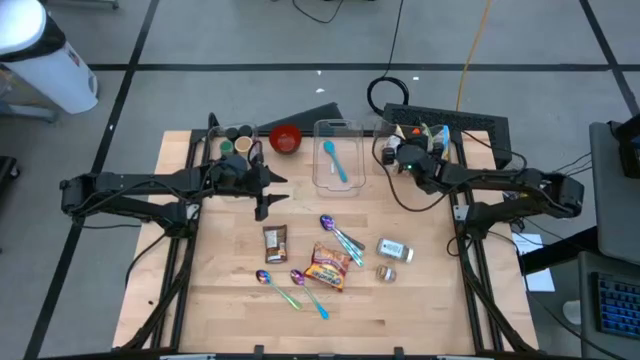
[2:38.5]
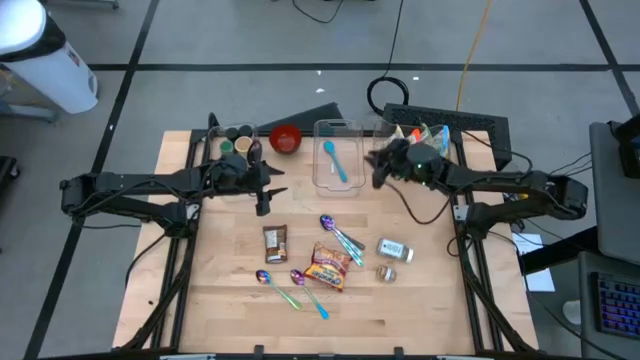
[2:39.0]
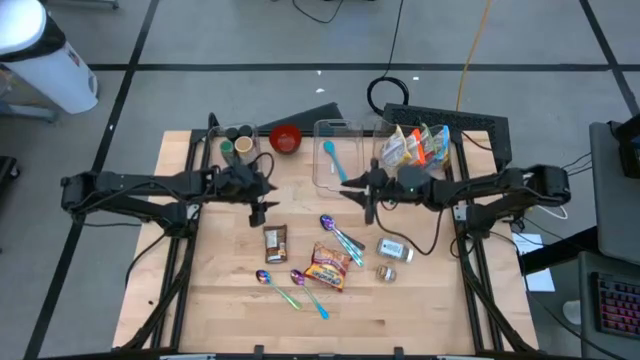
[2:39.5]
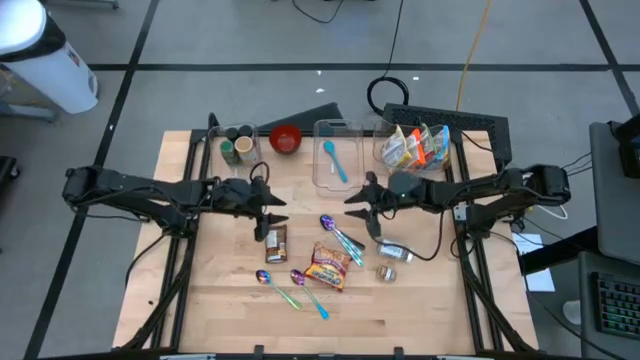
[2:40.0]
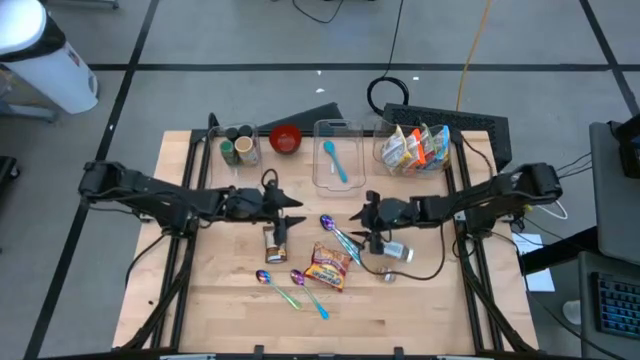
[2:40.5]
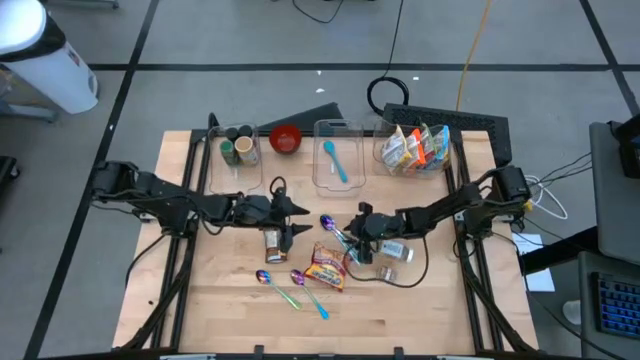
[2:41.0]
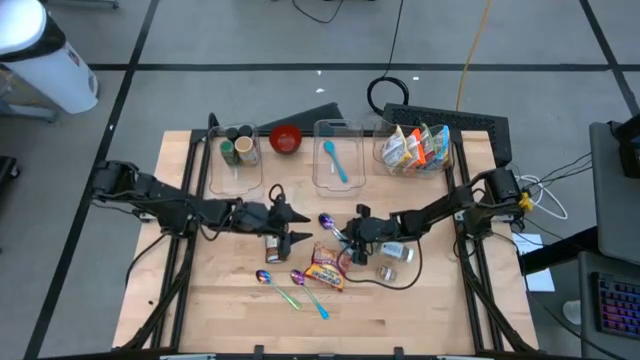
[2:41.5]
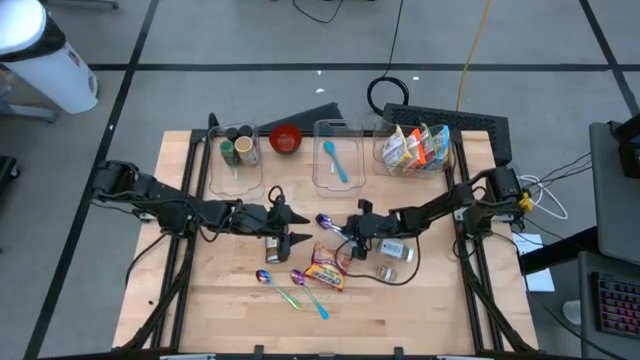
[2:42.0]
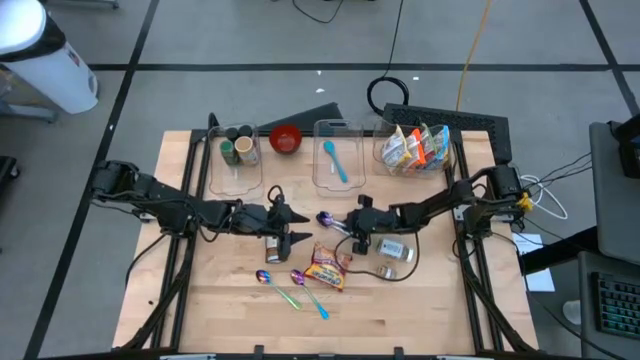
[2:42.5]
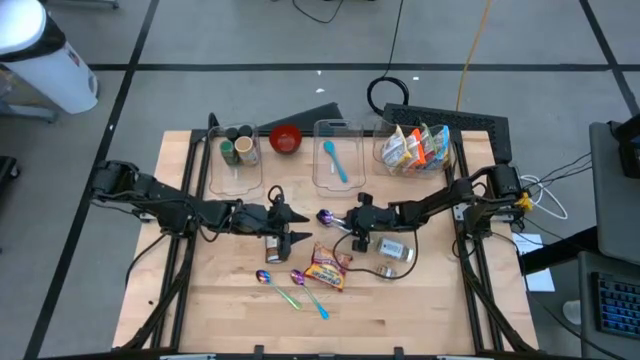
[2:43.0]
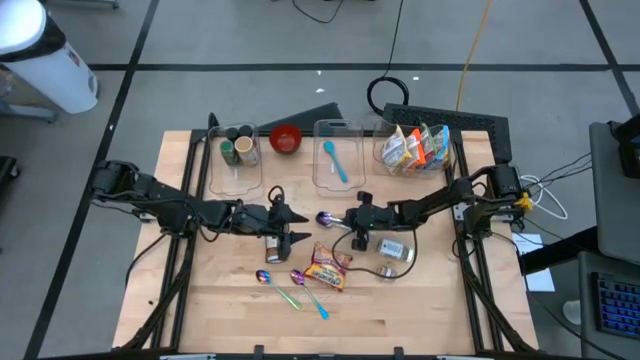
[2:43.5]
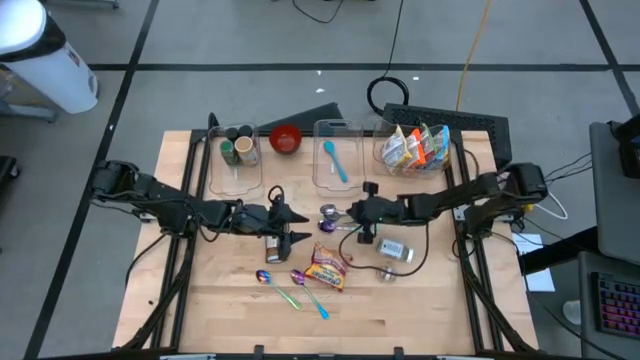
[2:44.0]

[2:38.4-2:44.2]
Task: Pick & Place Food Item
Put the top blue patterned spoon into the middle transparent bin

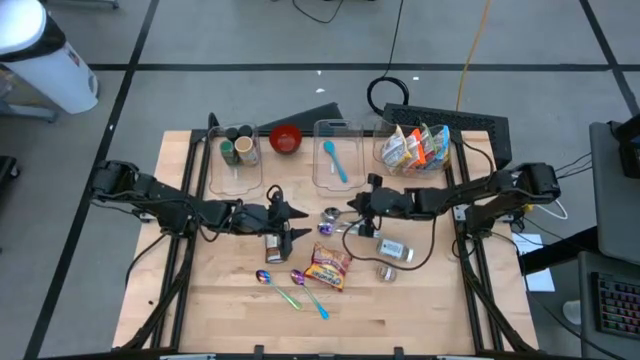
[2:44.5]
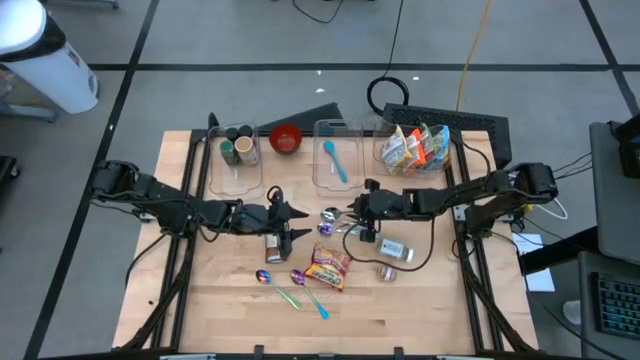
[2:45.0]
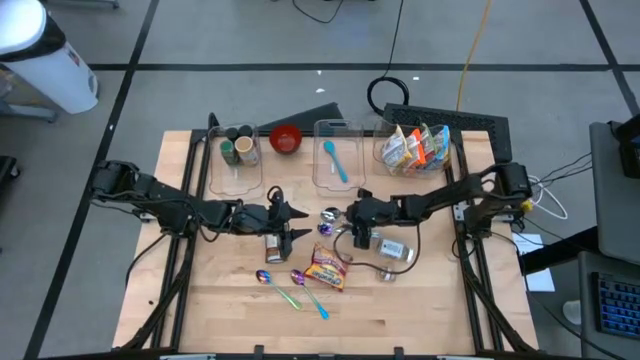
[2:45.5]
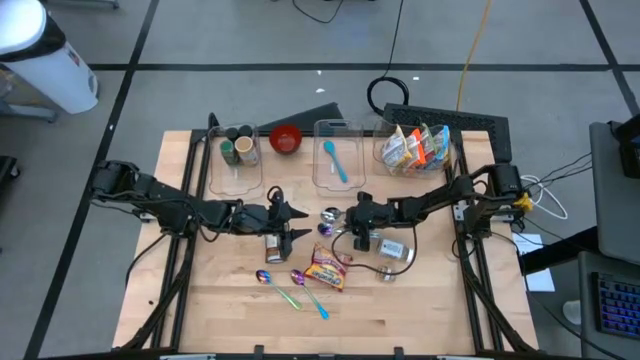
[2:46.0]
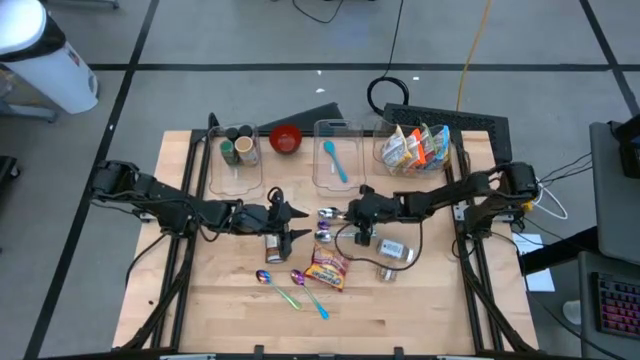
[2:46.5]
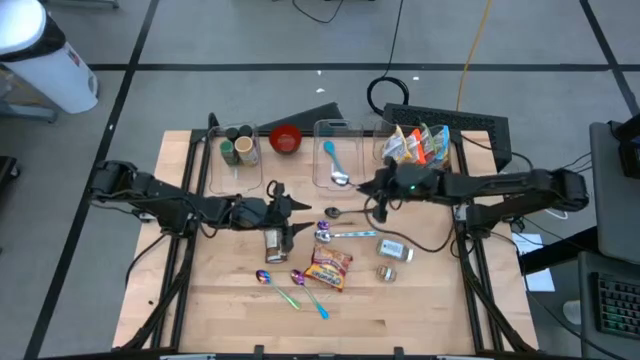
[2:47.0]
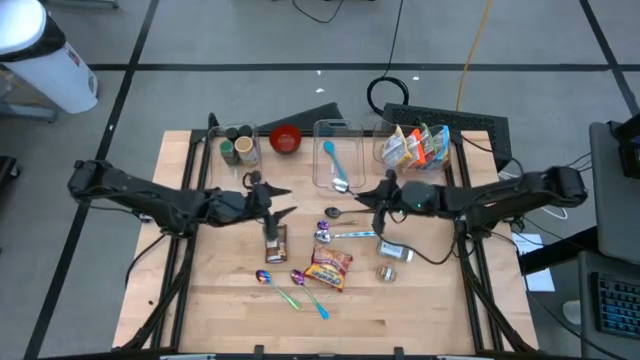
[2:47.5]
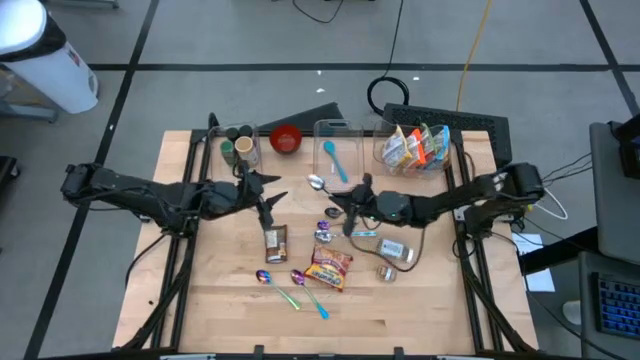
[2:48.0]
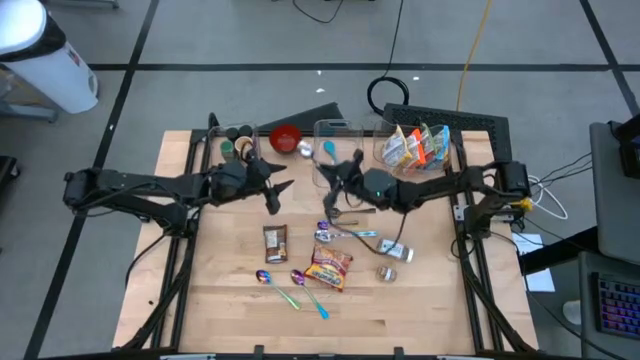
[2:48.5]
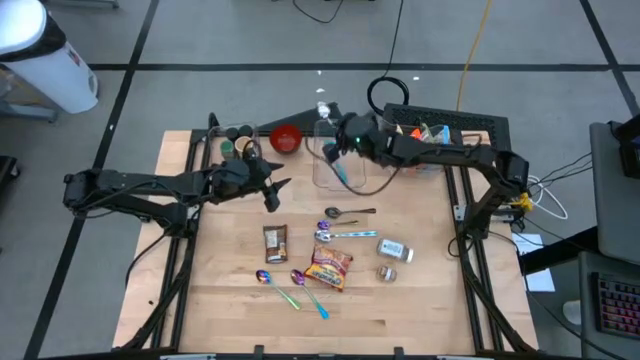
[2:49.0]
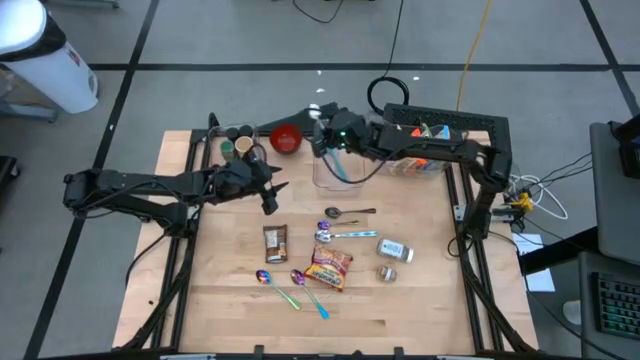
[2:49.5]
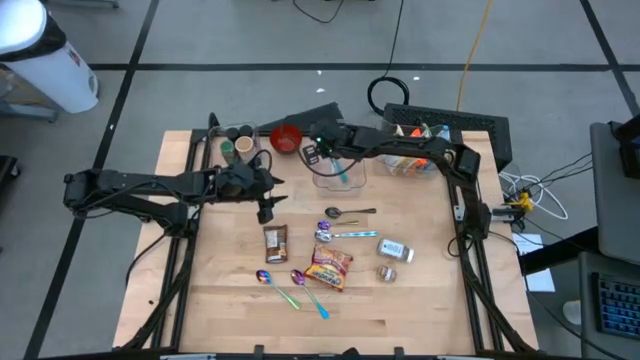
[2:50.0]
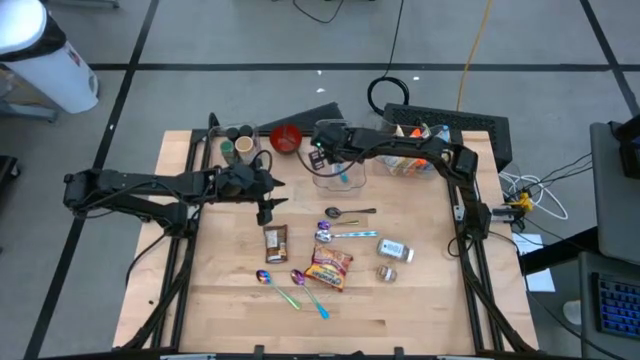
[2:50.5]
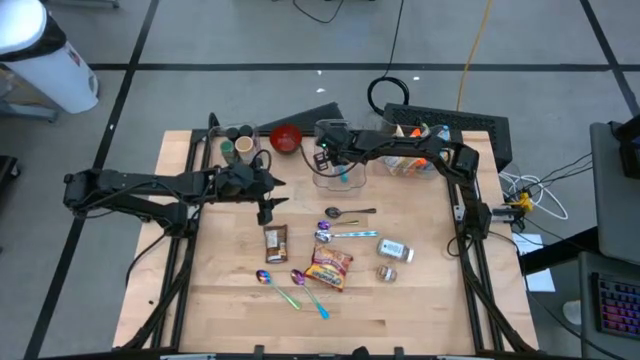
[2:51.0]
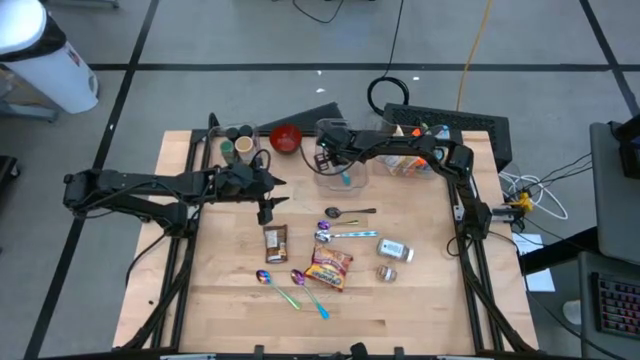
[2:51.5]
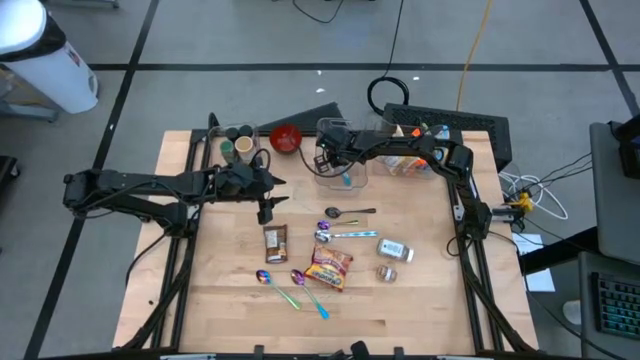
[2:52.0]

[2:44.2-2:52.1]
Put the top blue patterned spoon into the middle transparent bin

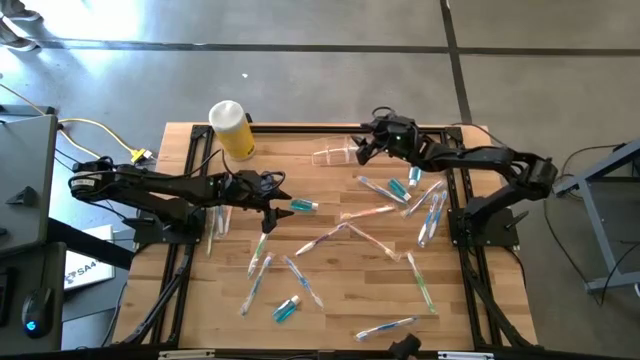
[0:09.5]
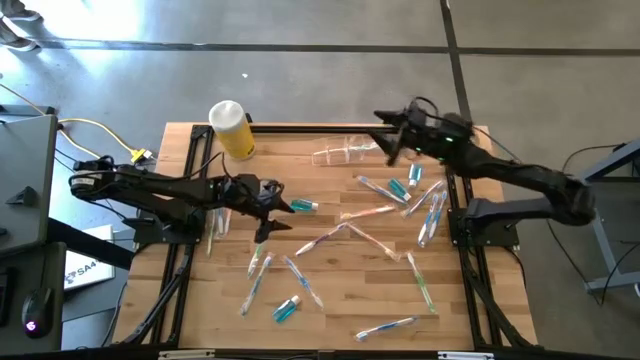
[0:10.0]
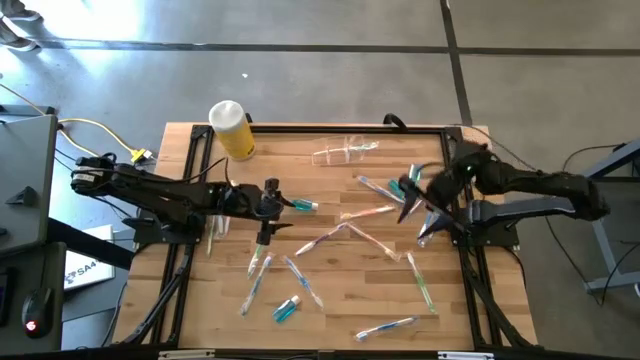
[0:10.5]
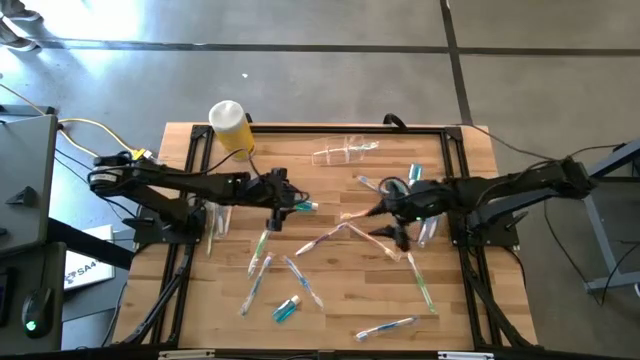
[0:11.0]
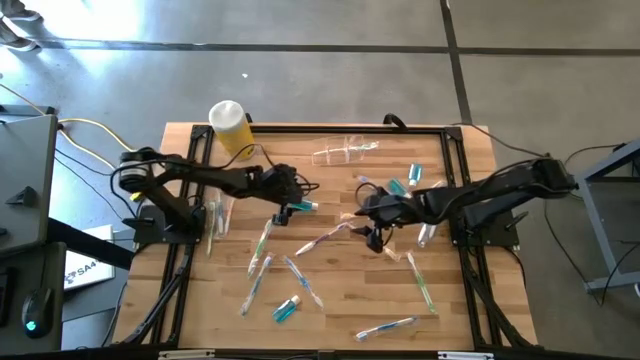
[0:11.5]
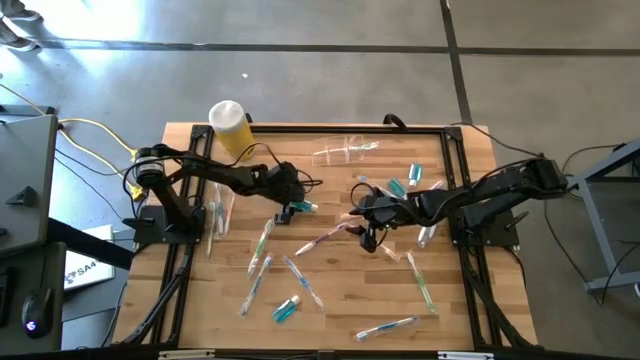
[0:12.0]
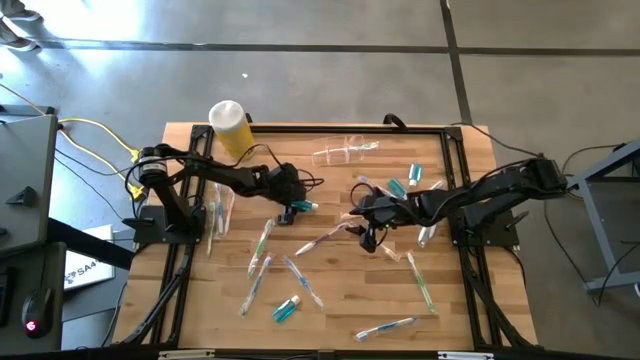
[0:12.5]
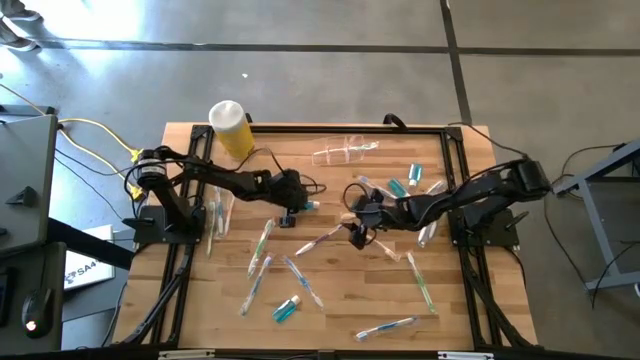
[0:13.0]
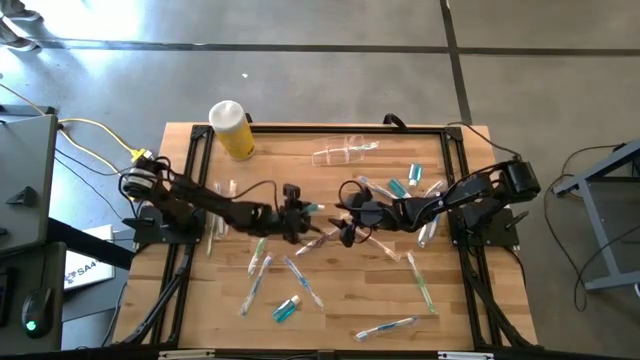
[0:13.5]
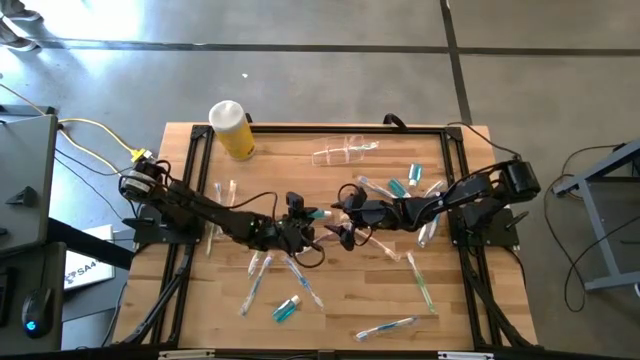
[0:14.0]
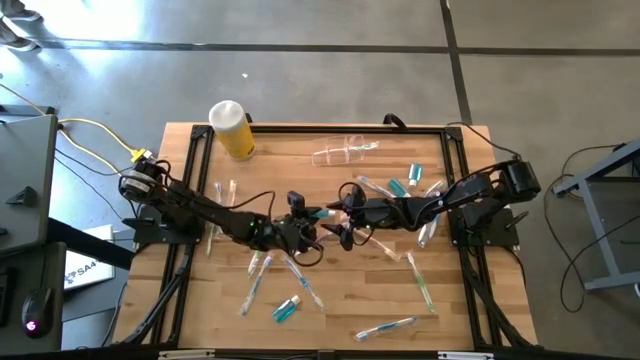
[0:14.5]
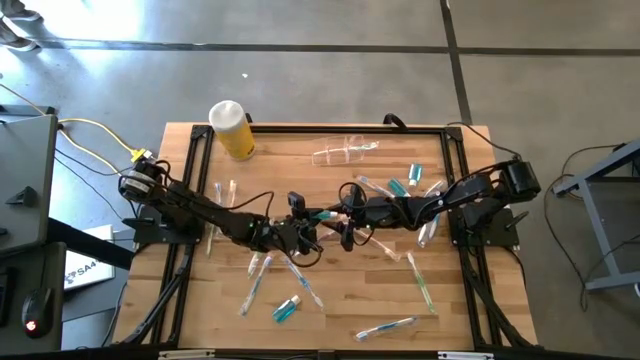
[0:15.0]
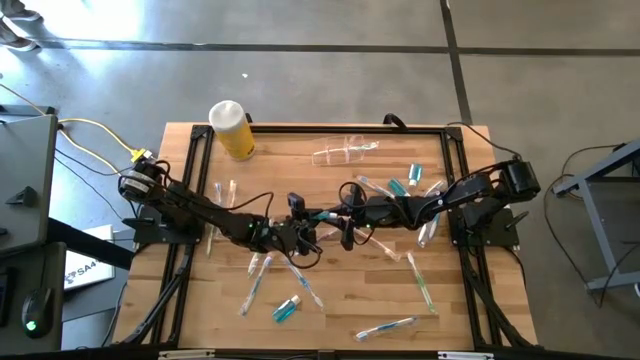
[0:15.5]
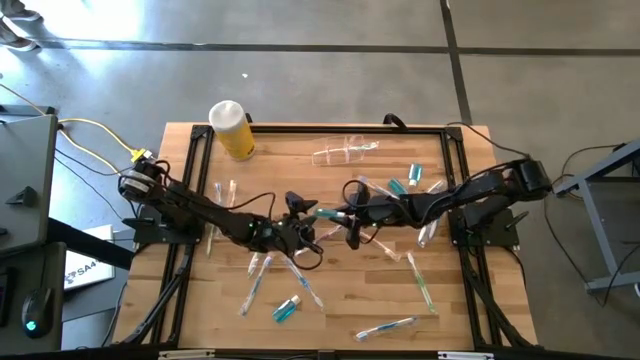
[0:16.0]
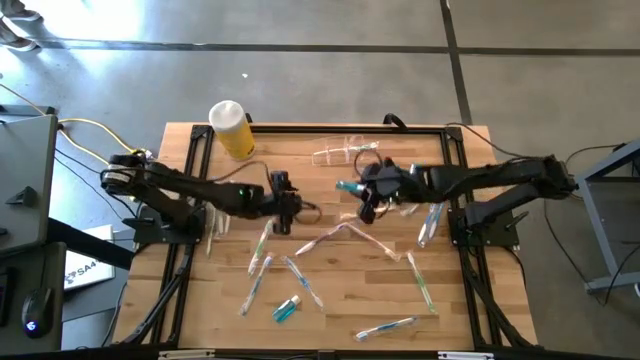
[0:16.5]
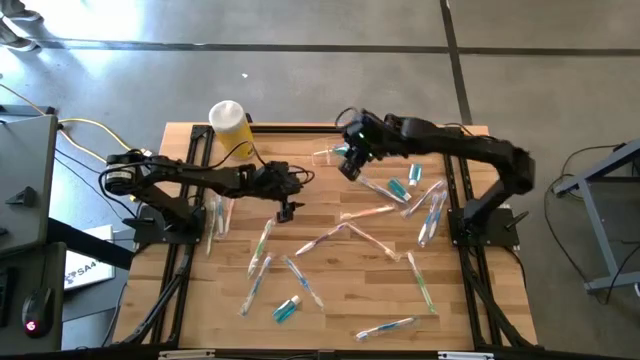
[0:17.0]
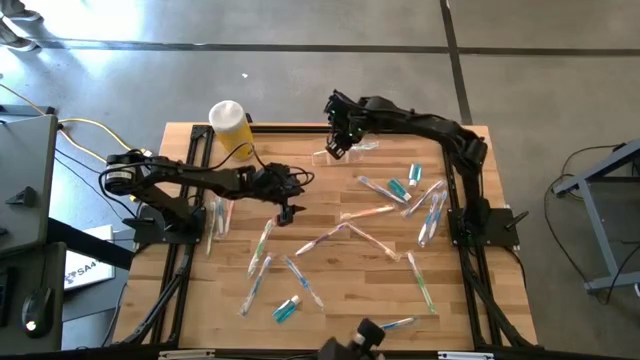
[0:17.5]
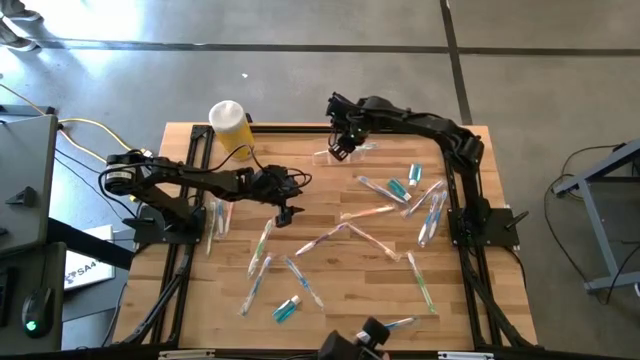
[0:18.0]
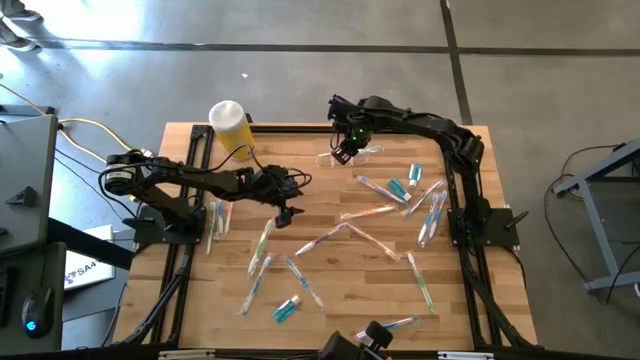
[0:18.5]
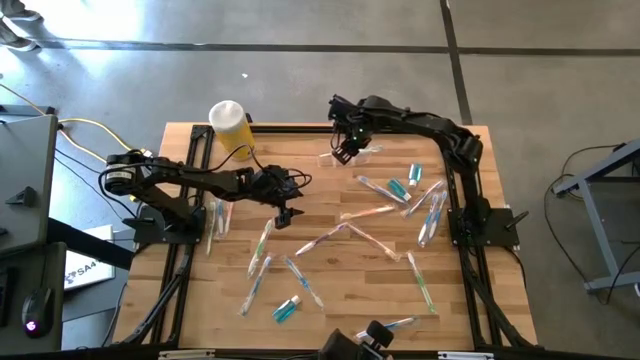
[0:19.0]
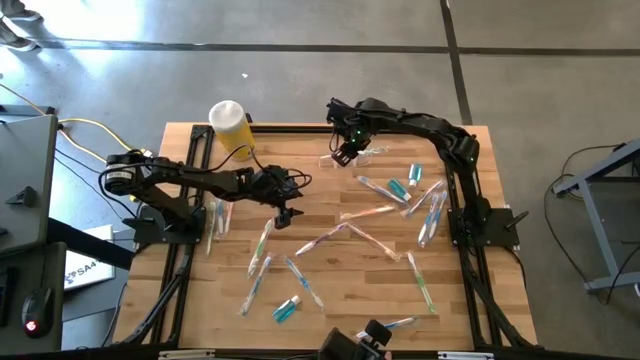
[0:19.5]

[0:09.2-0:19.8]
Task: Pick & Place toothbrushing station
Put the blue mouthwash bottle into the transparent organizer
